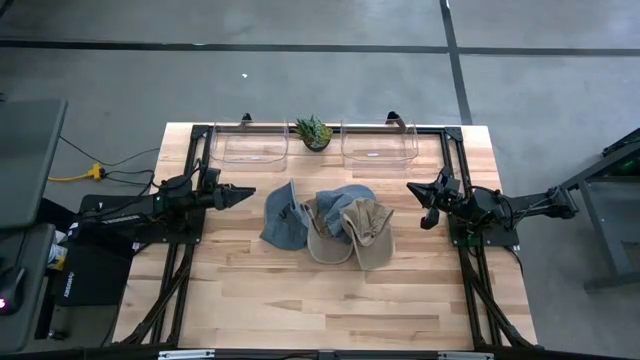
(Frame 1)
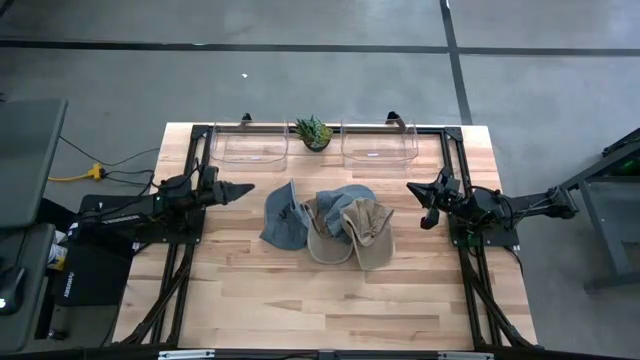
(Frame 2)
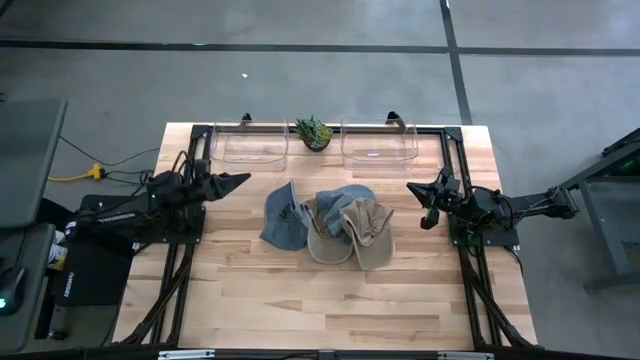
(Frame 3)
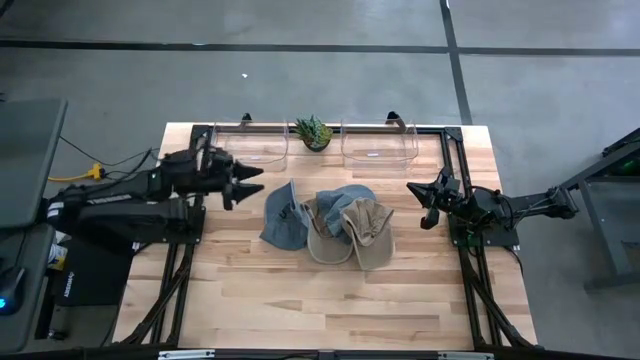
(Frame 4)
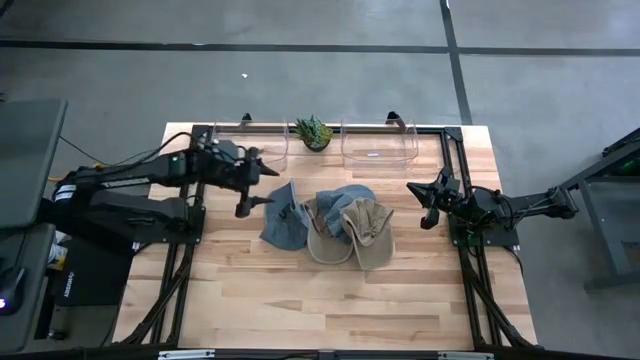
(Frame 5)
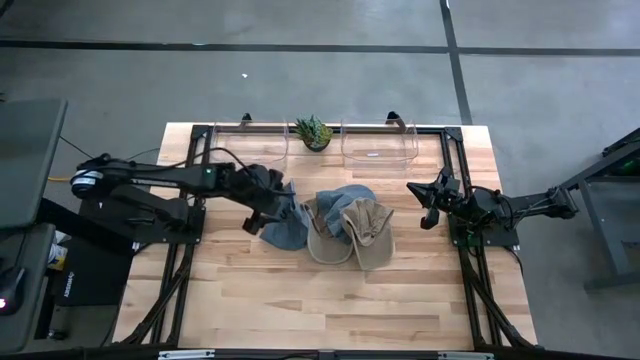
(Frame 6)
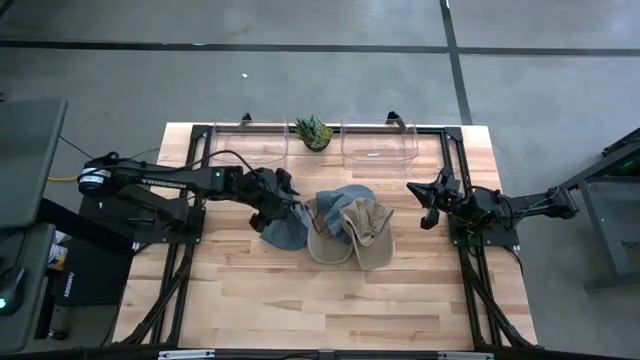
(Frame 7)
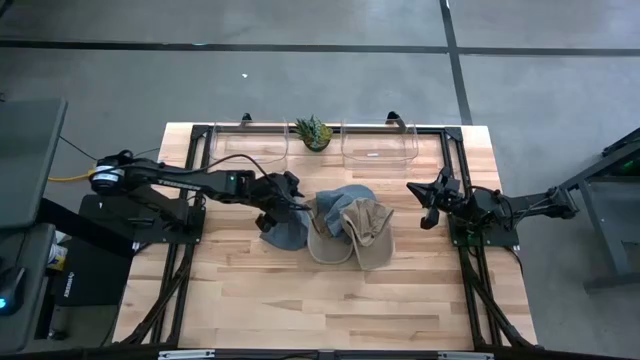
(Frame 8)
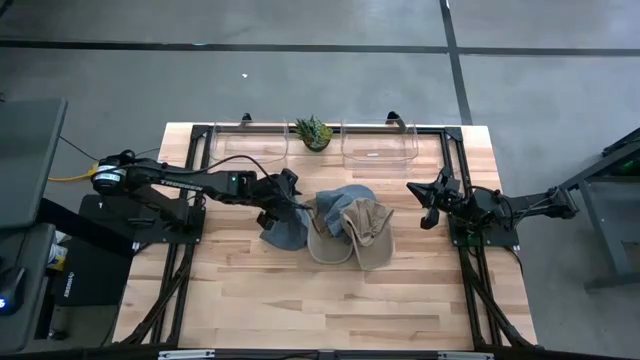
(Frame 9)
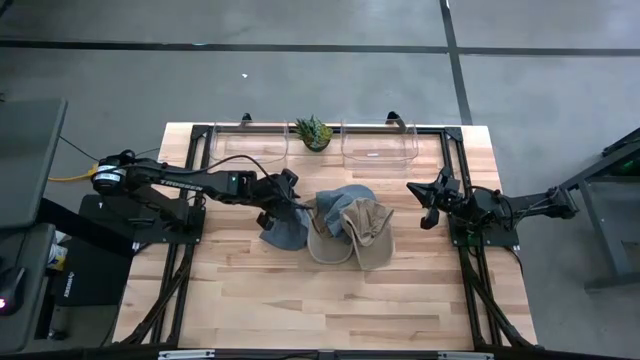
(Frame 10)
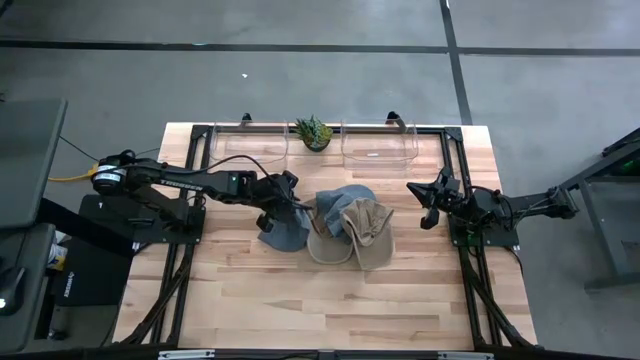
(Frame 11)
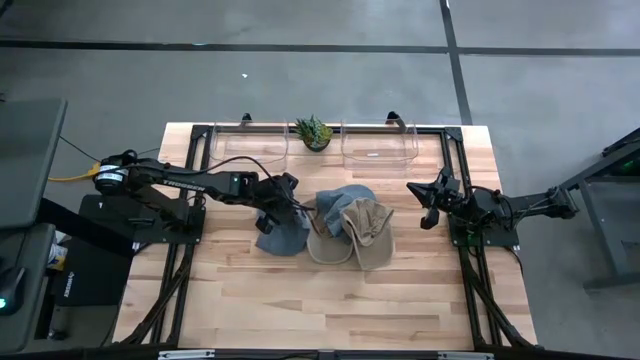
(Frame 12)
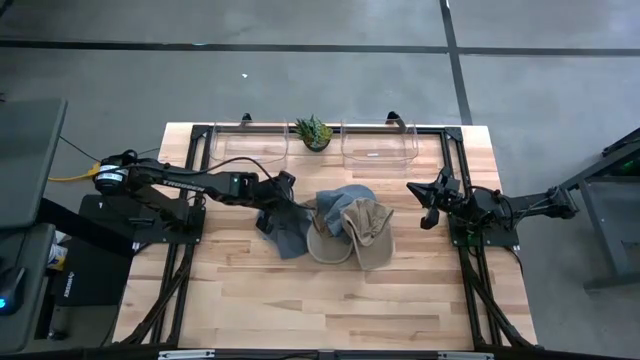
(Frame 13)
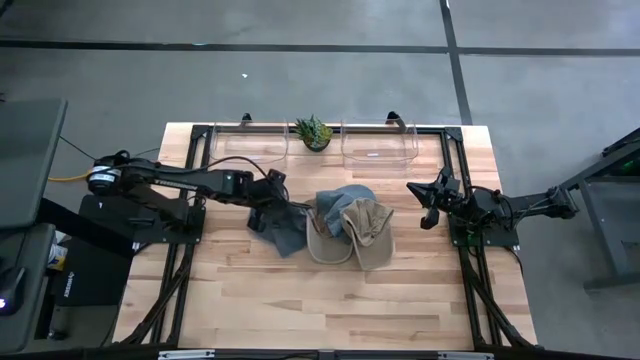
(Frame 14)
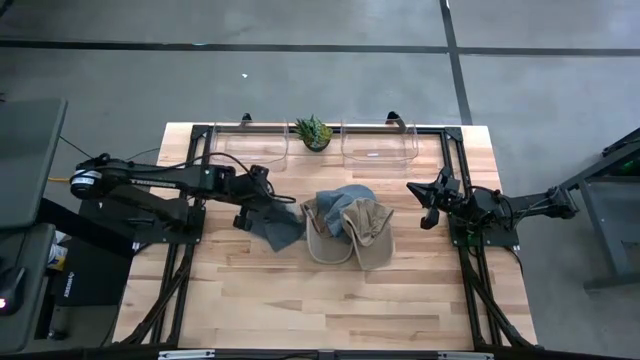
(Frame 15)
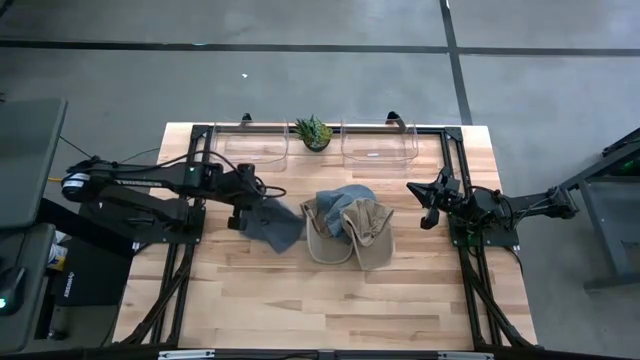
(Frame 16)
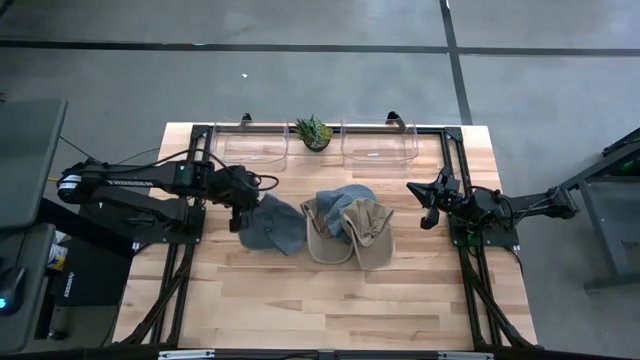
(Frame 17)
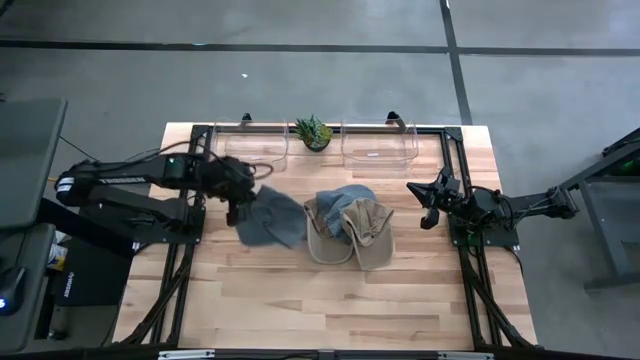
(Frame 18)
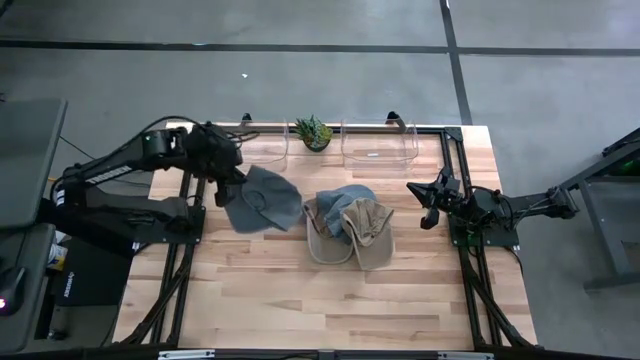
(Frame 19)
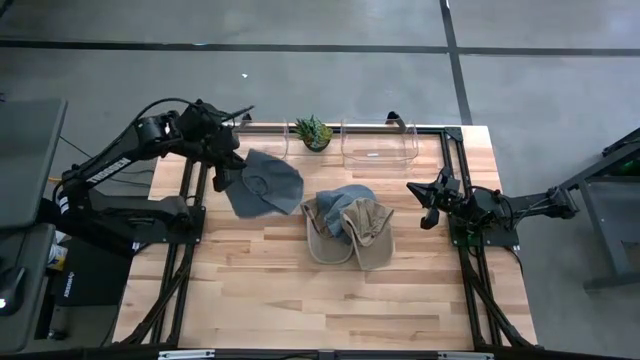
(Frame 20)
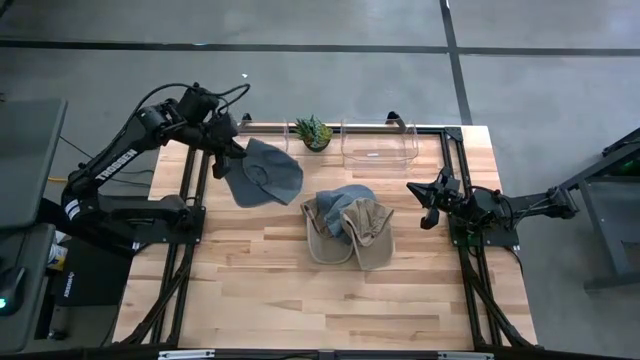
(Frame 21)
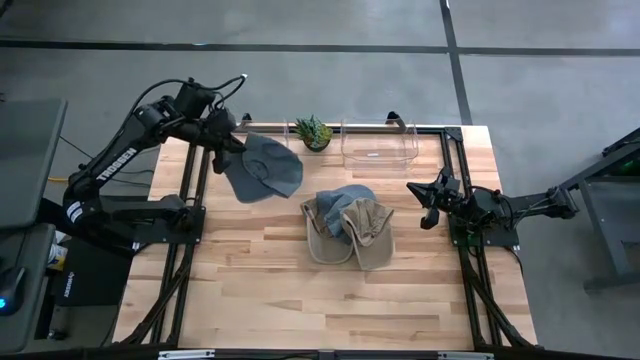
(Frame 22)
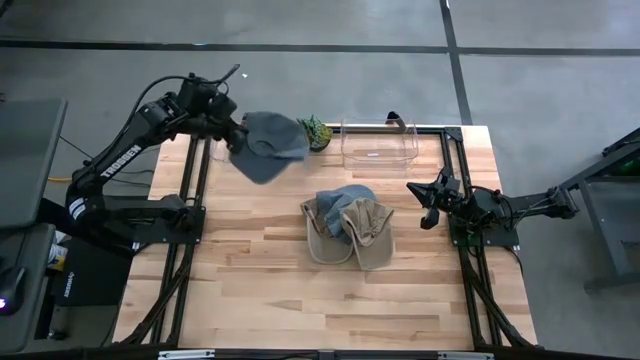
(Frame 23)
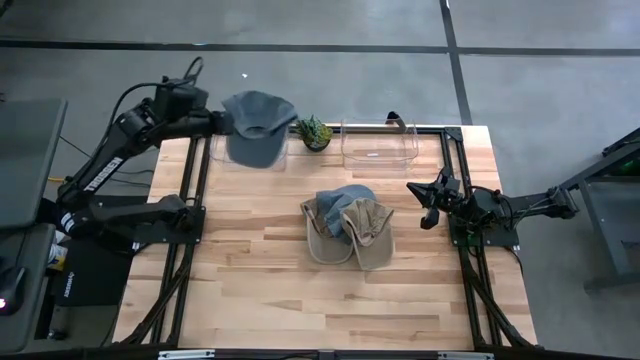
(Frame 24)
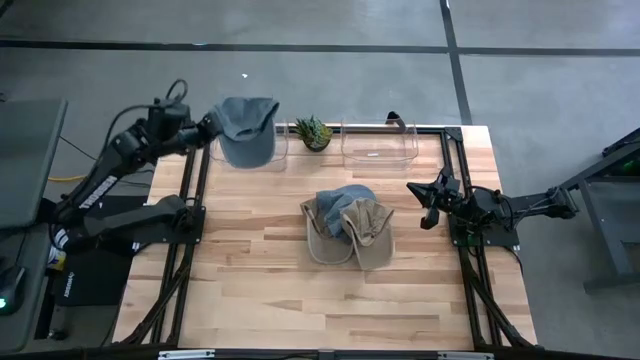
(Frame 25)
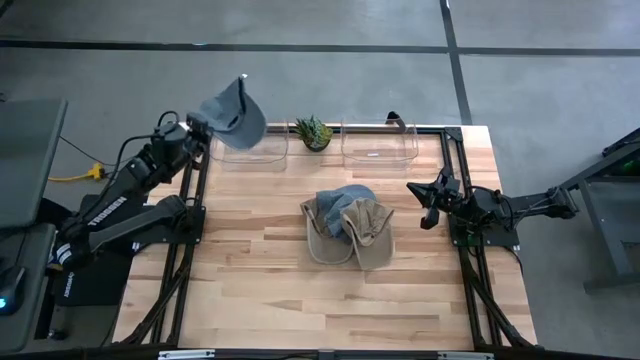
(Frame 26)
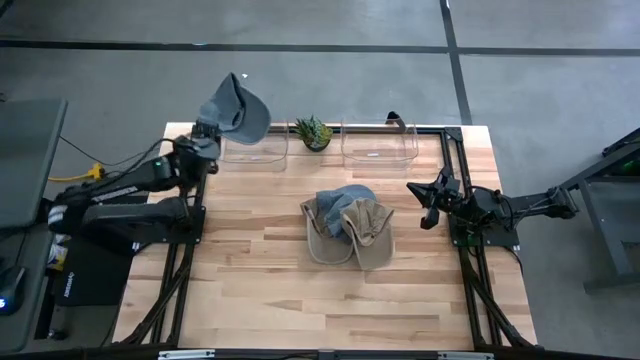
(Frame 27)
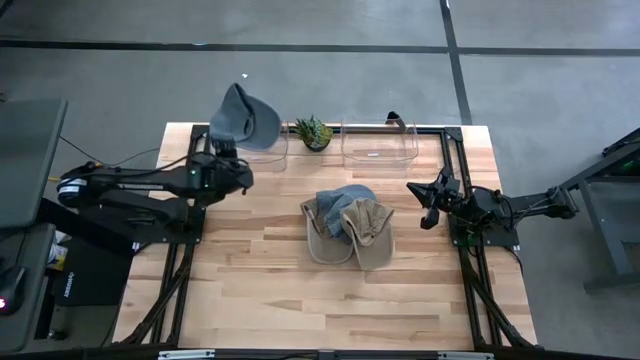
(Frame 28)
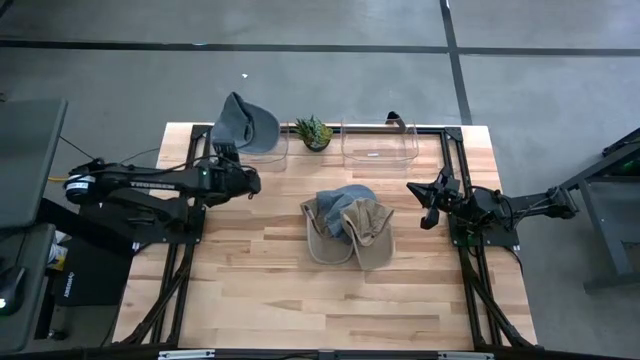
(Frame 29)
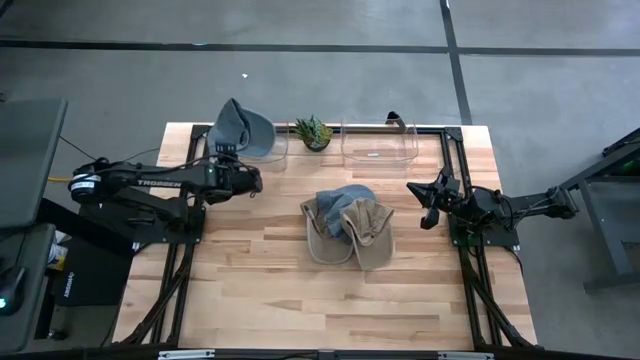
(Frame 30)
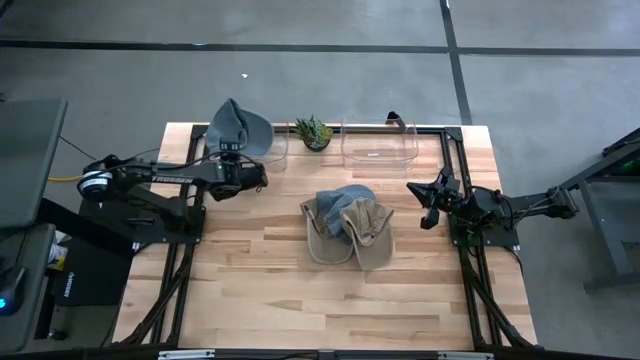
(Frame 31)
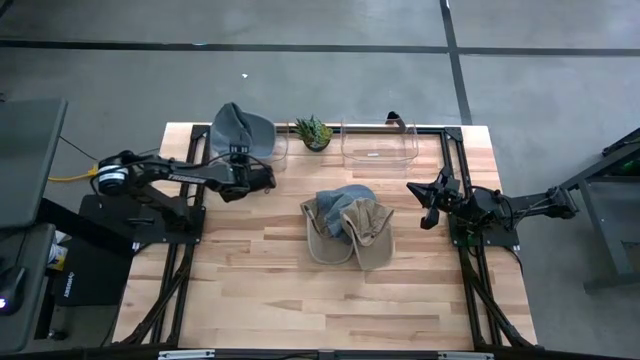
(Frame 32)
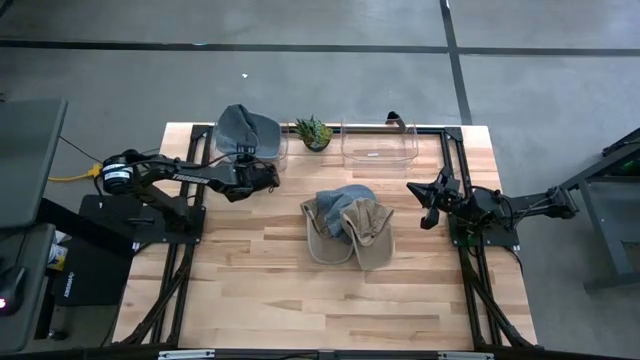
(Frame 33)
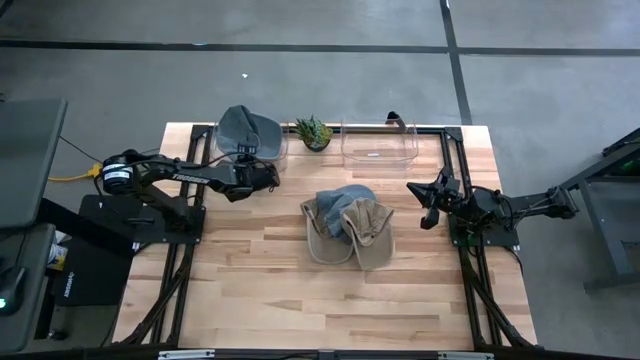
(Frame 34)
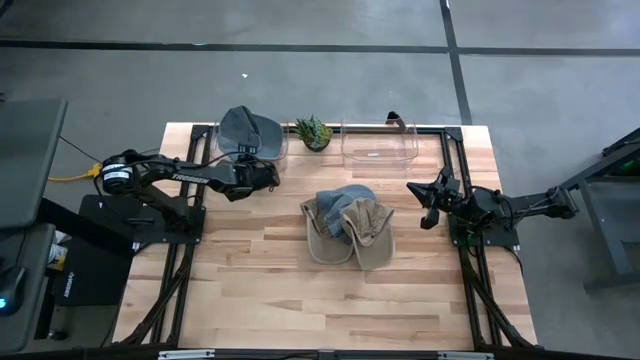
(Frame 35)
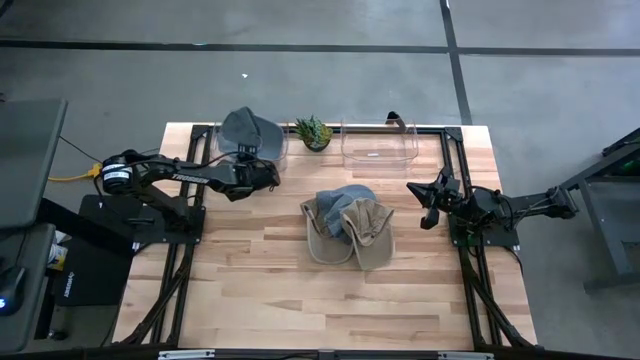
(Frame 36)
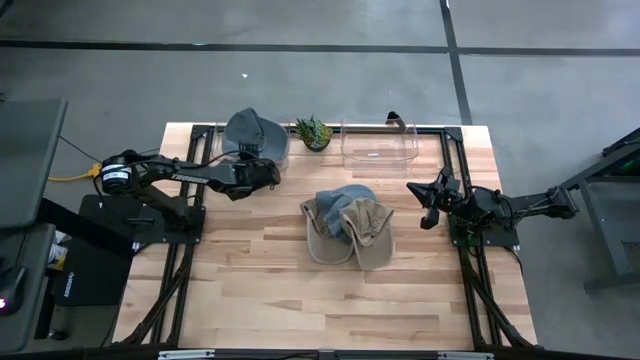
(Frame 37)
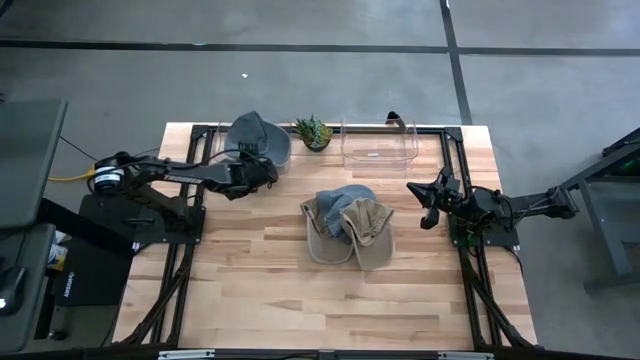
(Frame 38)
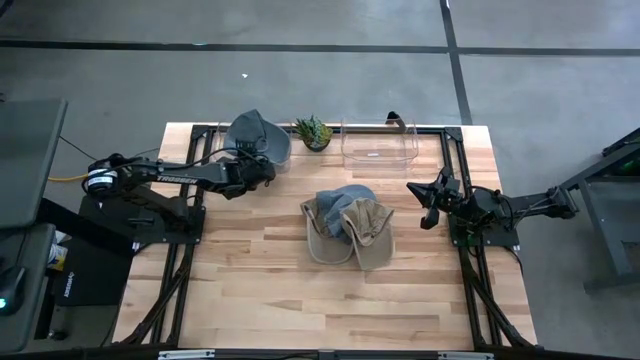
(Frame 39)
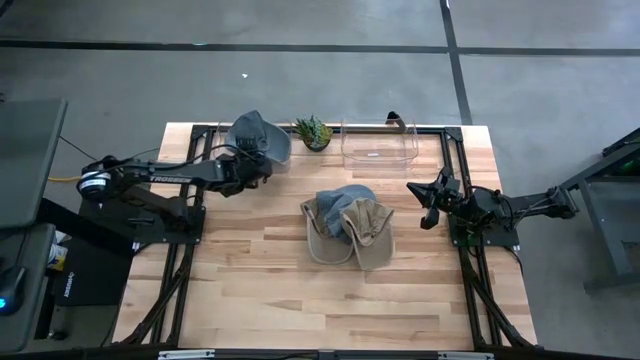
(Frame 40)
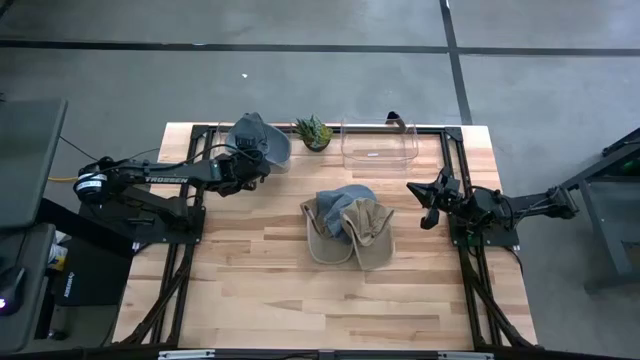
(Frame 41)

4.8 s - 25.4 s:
Task: Pick & Place hat
Put the left gray cap into the left transparent bin
